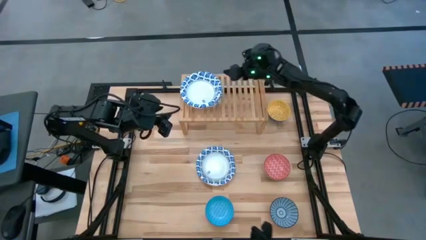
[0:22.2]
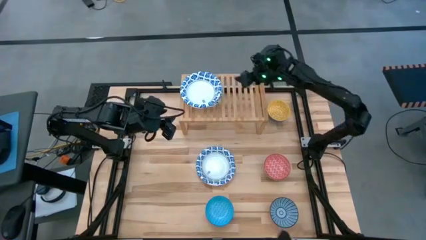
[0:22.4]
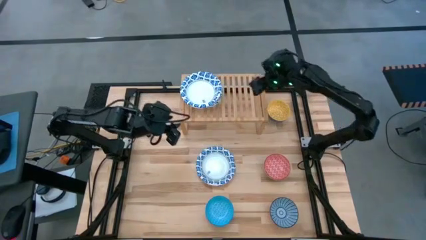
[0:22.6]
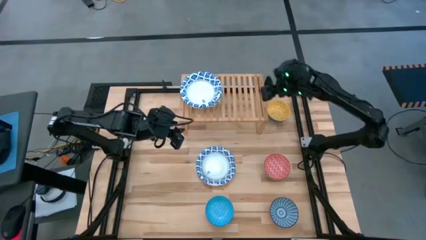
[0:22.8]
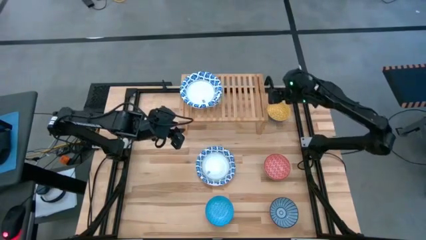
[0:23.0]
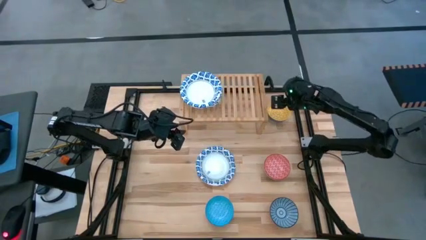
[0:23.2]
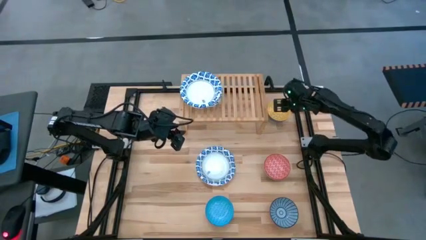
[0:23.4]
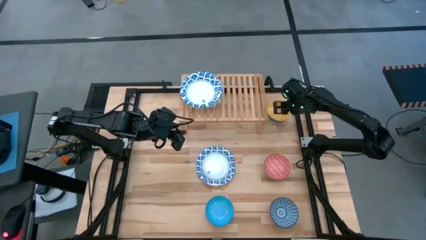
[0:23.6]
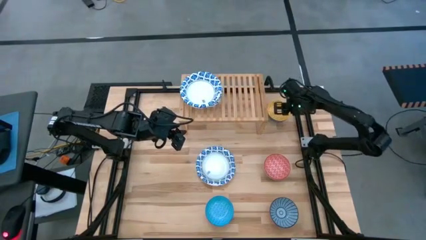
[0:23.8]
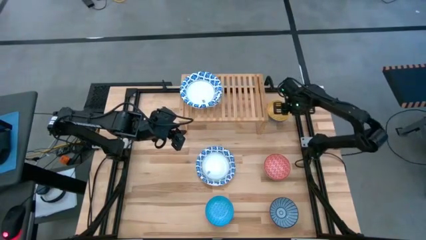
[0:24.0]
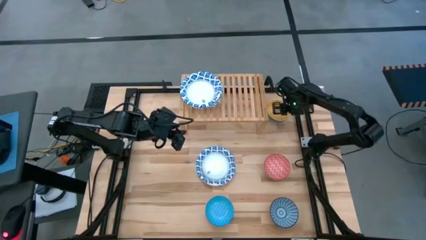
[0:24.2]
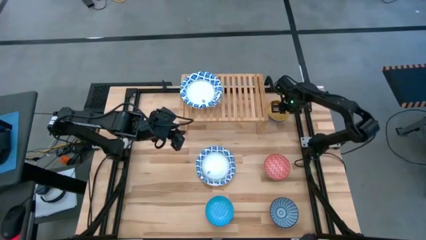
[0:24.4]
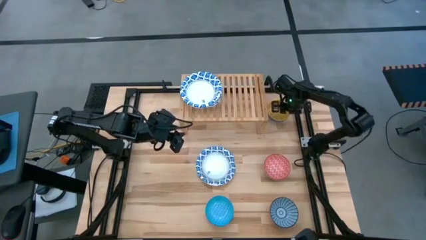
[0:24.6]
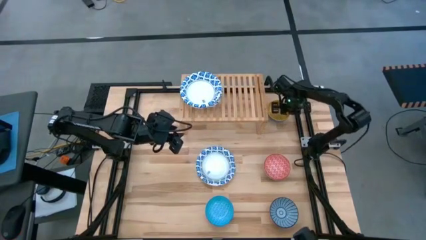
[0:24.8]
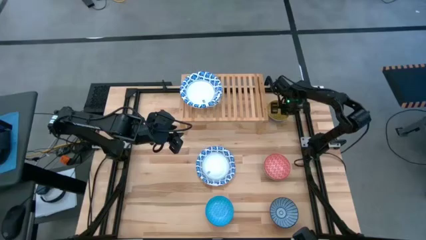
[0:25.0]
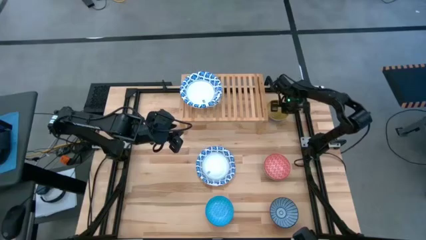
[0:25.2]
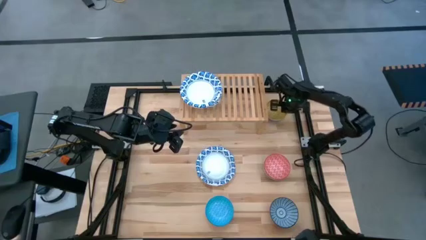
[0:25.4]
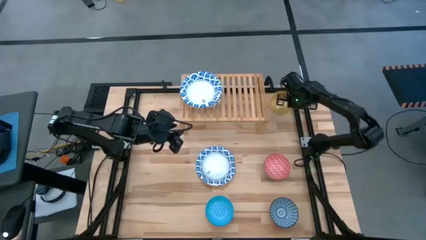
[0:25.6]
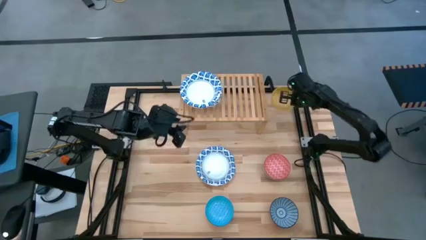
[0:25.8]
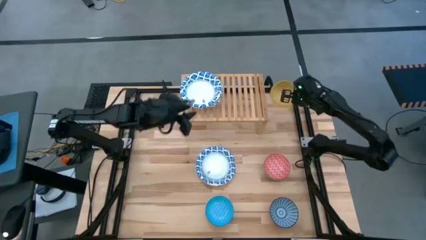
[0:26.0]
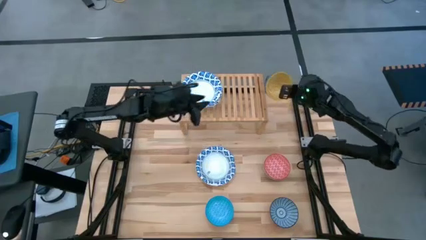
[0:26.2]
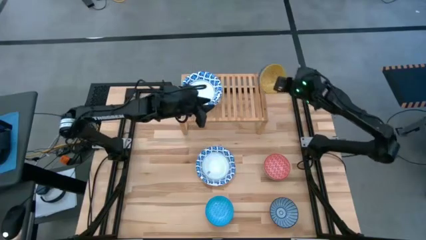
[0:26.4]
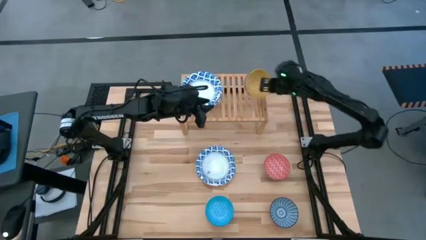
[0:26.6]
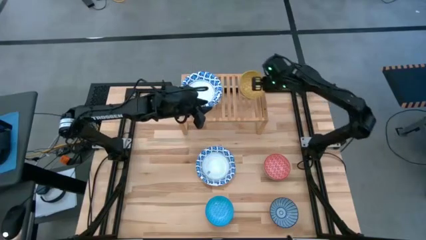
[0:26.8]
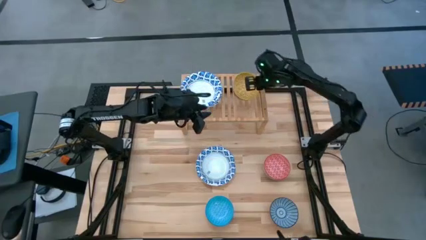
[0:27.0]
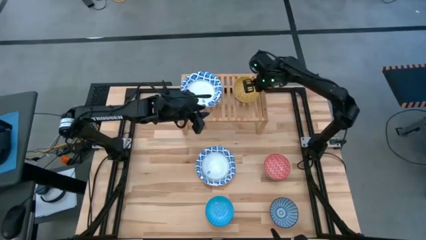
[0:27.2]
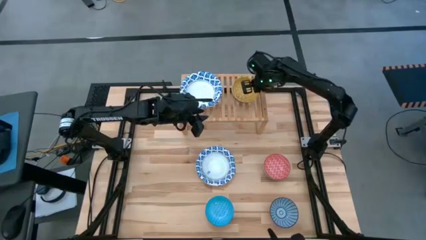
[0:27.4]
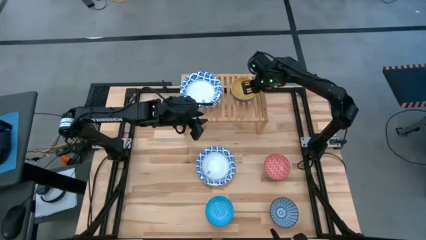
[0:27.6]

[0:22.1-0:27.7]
Task: Place and stack bowls onto a shelf
Put the yellow patterned bowl on the shelf

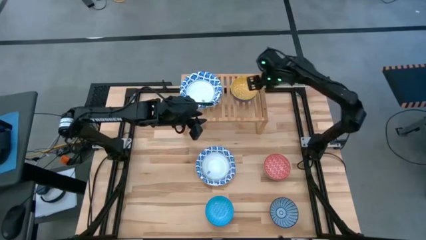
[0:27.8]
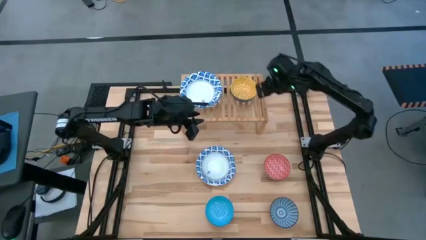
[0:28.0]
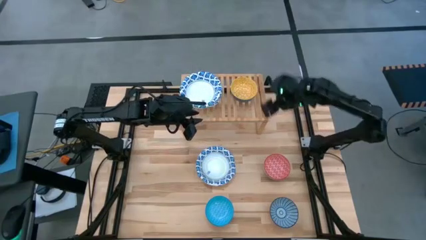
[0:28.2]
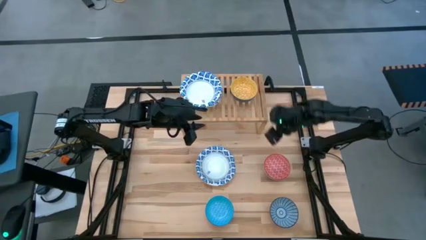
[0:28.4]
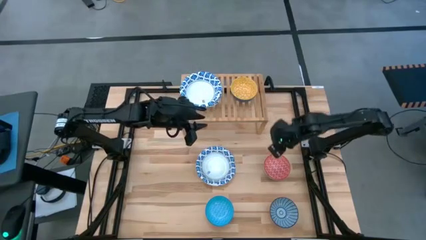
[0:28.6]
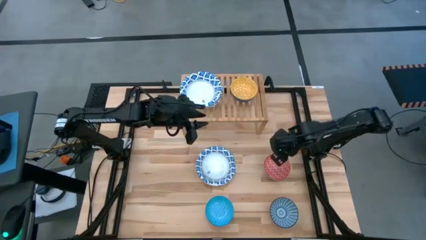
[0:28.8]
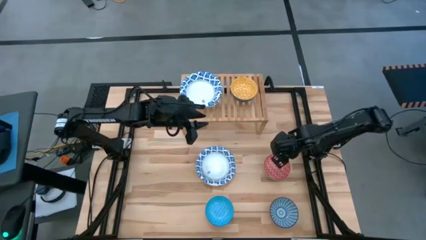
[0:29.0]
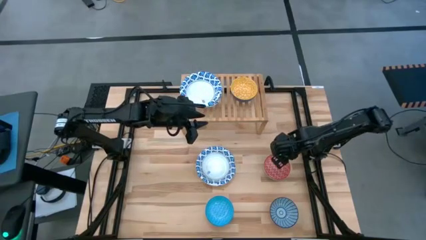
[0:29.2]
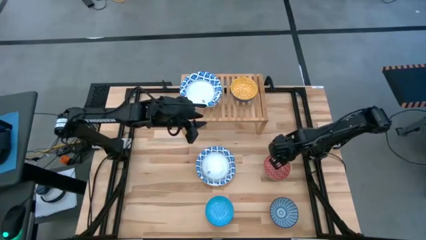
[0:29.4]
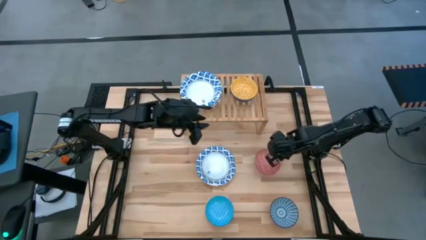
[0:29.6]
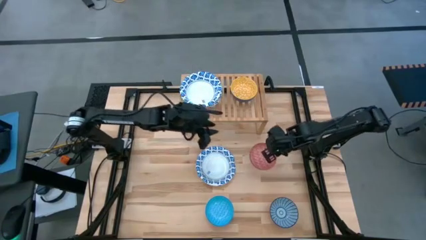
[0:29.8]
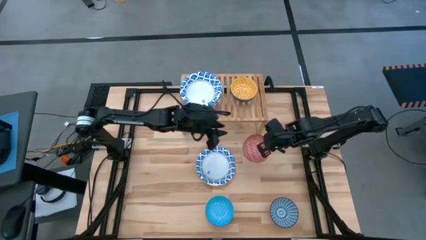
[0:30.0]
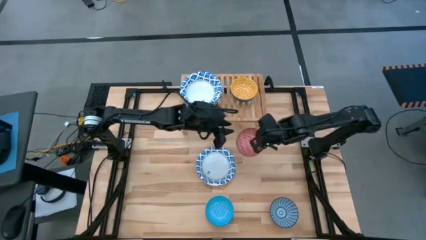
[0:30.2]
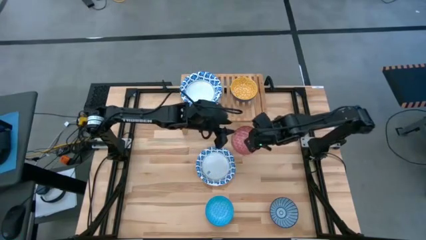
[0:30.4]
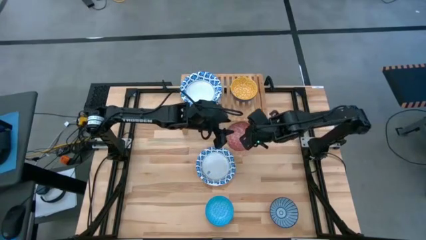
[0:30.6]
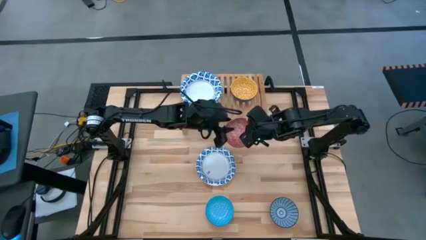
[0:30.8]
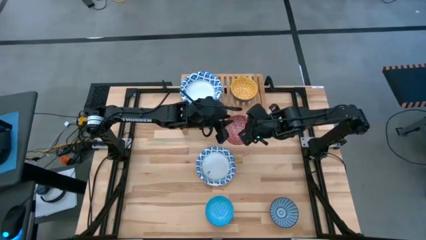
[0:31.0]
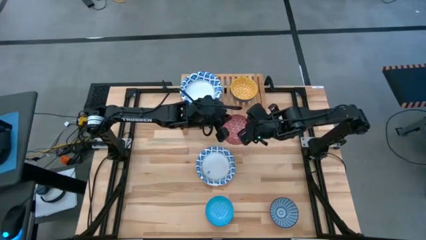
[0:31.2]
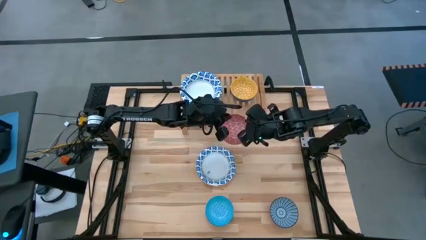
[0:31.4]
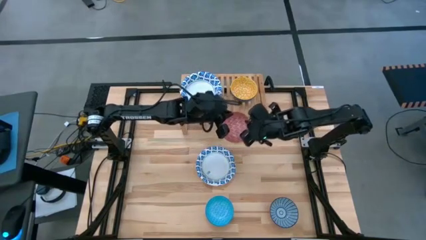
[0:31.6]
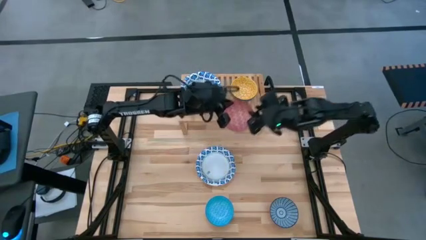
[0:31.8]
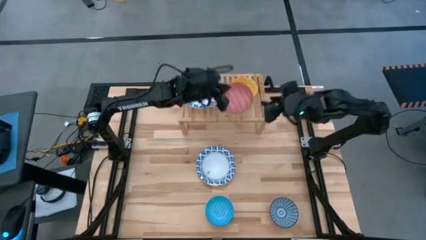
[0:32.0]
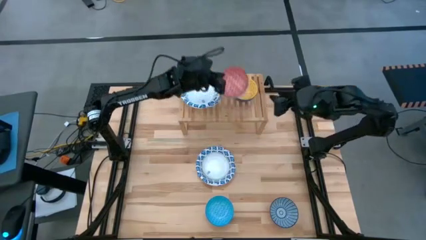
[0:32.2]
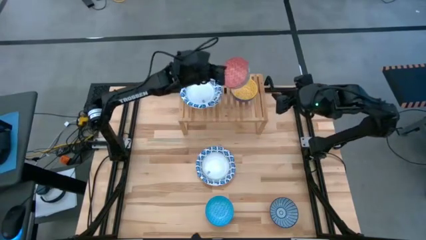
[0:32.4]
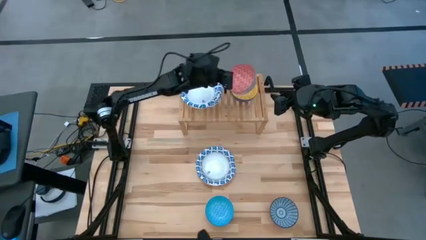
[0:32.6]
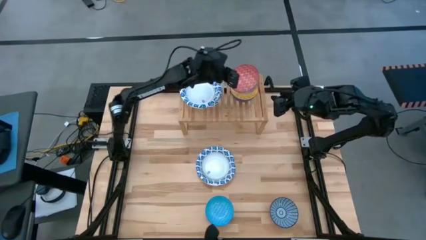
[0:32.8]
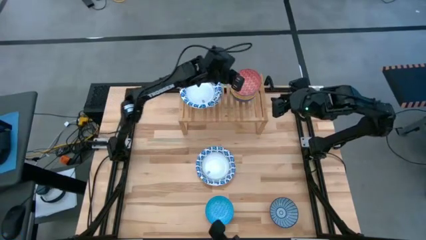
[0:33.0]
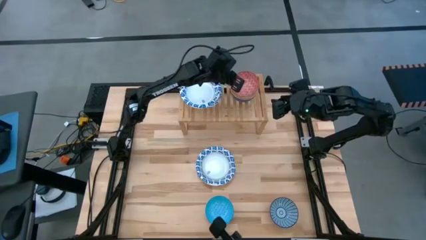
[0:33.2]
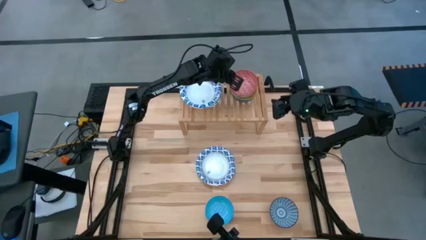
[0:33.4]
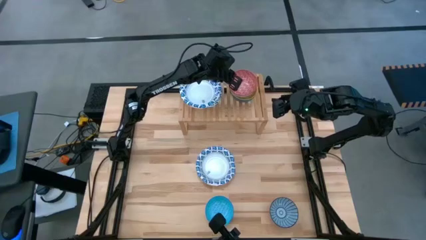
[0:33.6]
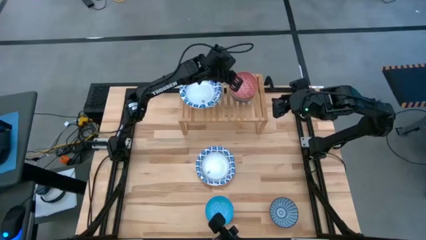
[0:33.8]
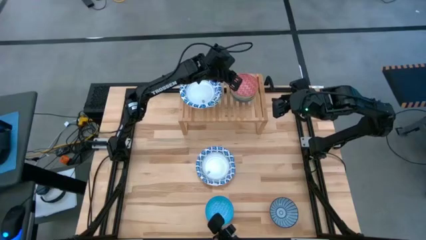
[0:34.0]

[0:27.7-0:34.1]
Stack the red patterned bowl on top of the yellow patterned bowl on the shelf

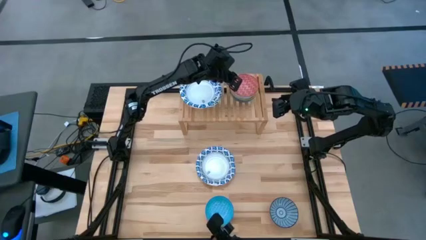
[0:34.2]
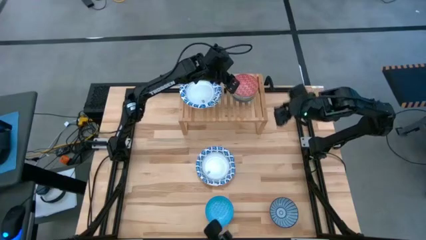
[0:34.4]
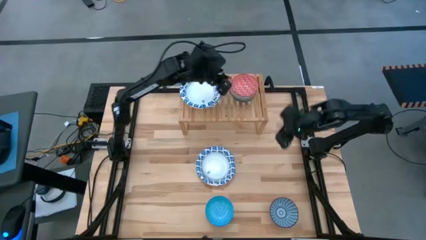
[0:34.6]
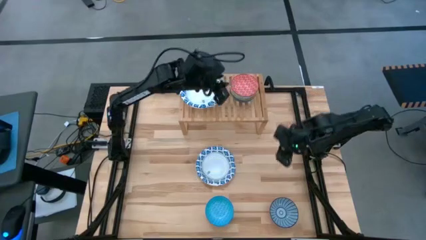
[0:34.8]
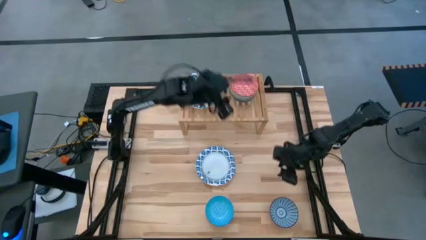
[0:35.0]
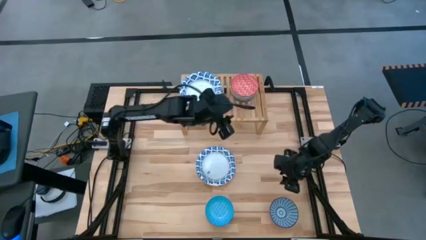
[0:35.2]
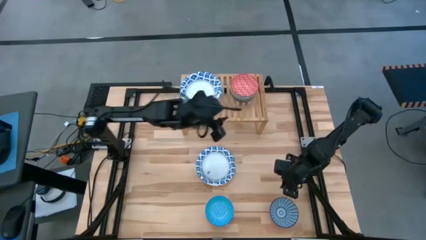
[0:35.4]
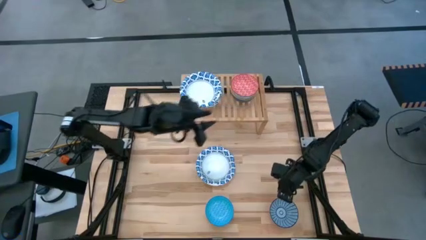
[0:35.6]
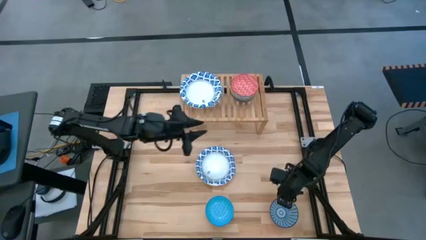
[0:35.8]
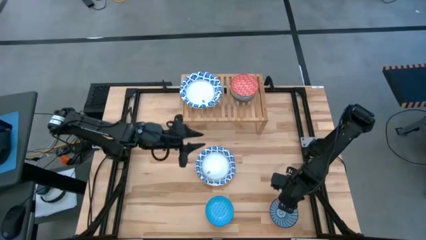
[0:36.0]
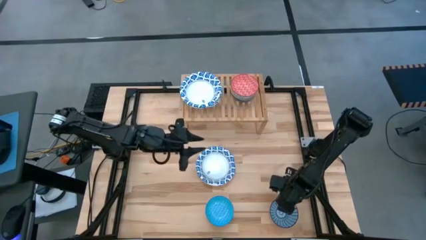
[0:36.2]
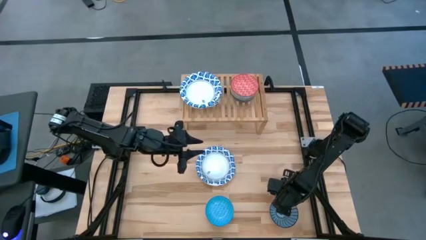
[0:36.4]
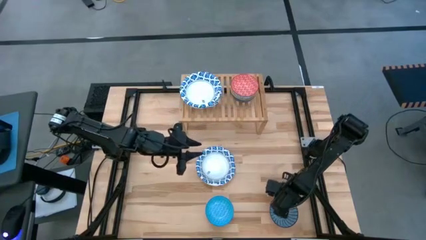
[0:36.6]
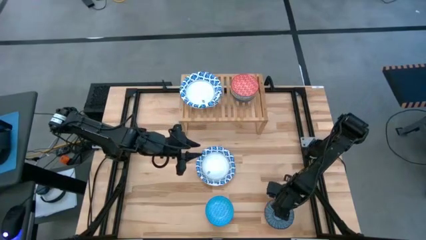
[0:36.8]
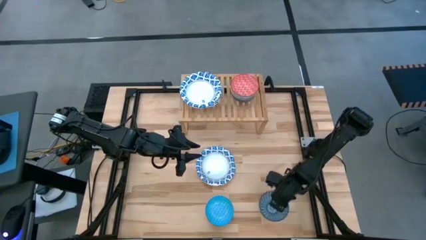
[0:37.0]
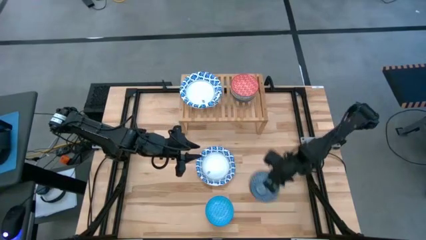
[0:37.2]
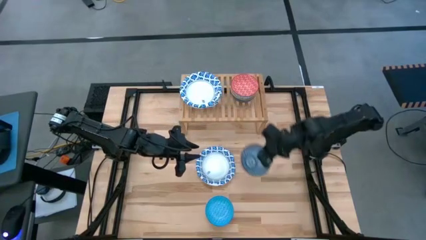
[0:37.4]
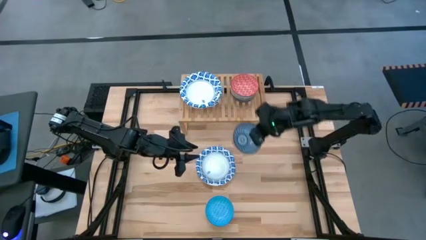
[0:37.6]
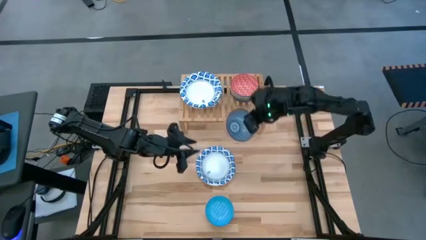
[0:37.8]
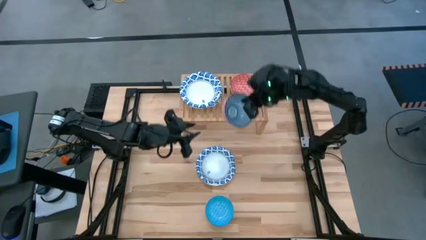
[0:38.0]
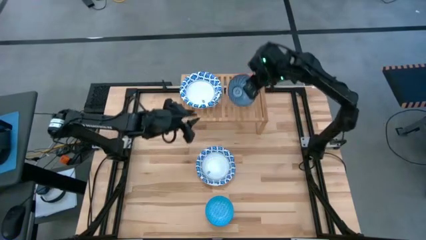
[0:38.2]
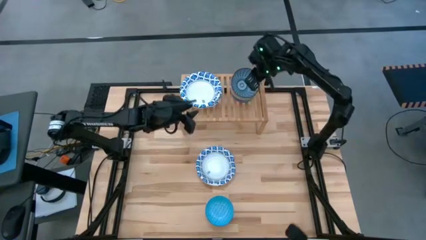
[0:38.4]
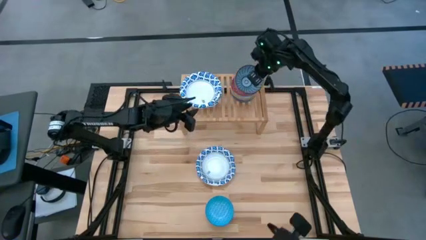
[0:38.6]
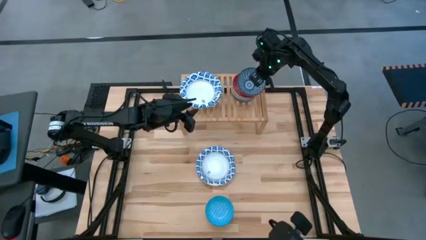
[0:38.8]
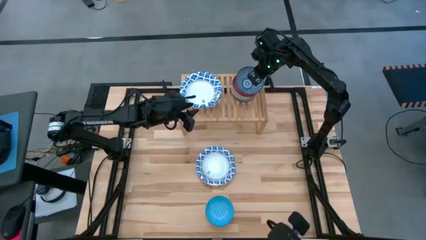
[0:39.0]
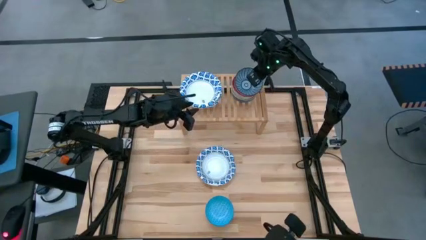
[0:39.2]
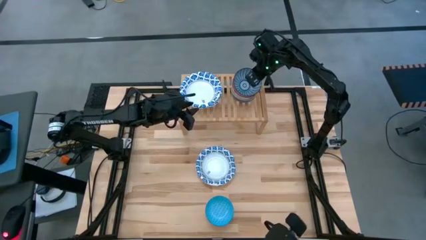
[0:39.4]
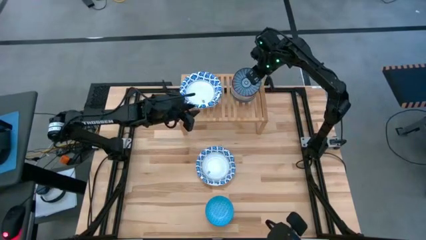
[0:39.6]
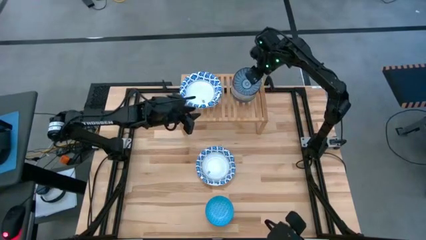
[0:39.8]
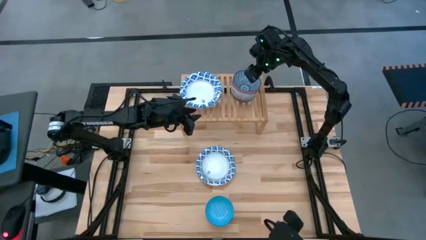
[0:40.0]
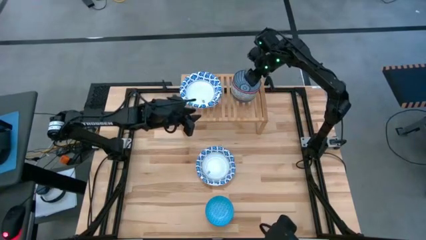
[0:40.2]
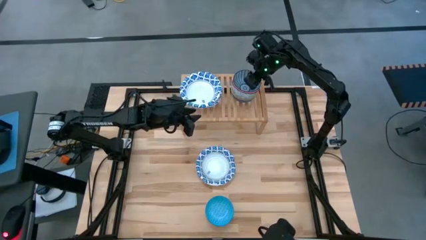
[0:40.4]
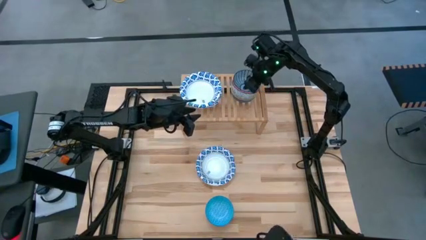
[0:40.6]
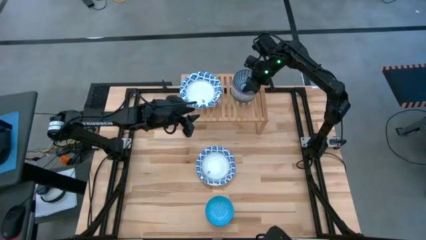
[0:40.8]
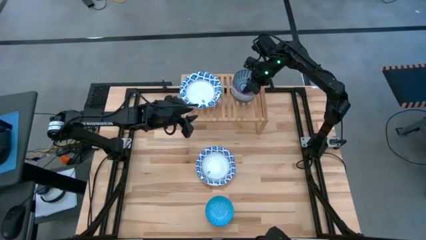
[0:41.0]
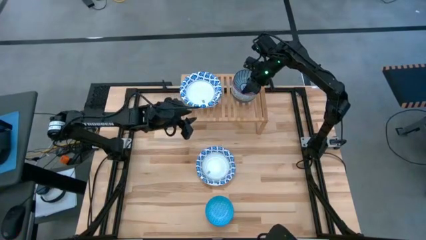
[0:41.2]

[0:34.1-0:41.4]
Stack the blue patterned bowl on top of the red patterned bowl on the shelf
